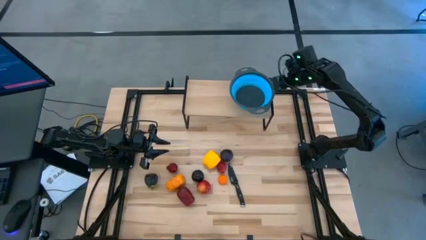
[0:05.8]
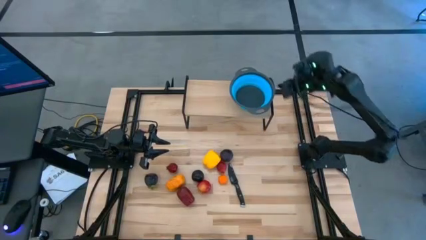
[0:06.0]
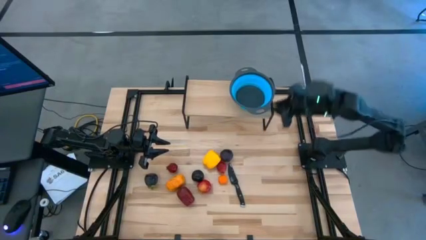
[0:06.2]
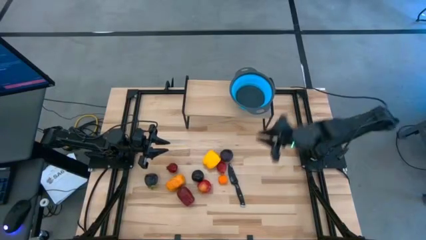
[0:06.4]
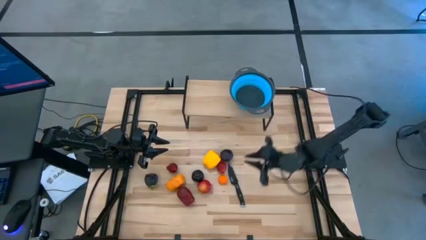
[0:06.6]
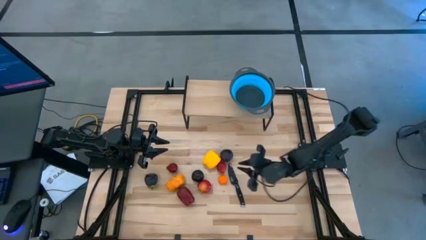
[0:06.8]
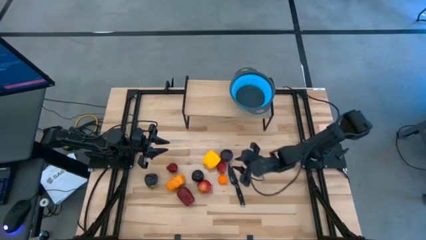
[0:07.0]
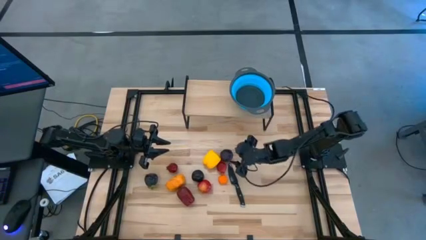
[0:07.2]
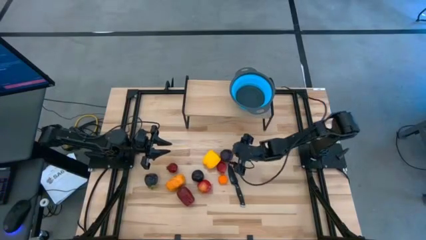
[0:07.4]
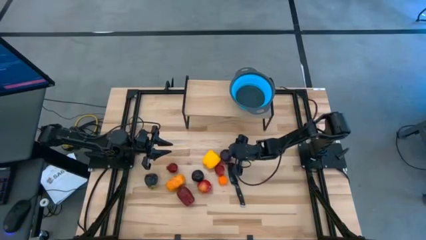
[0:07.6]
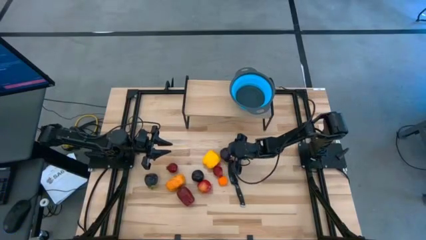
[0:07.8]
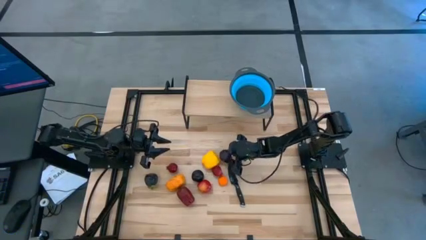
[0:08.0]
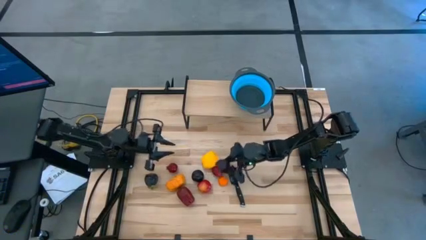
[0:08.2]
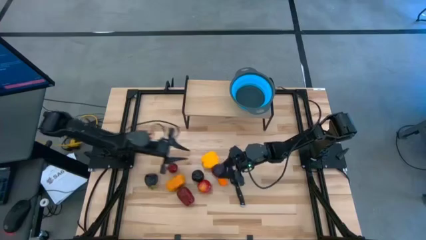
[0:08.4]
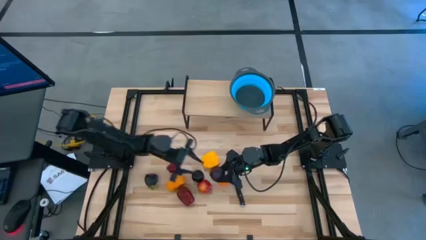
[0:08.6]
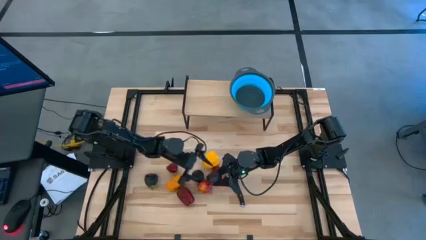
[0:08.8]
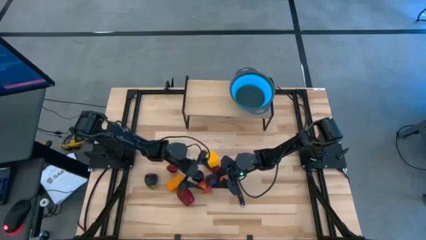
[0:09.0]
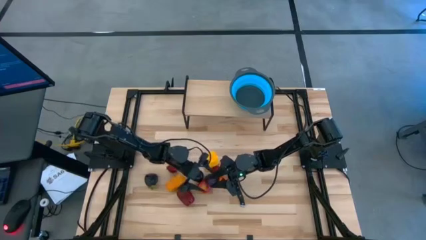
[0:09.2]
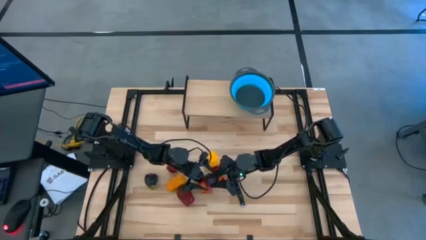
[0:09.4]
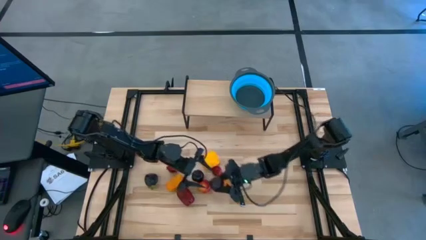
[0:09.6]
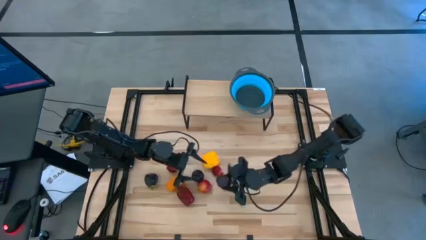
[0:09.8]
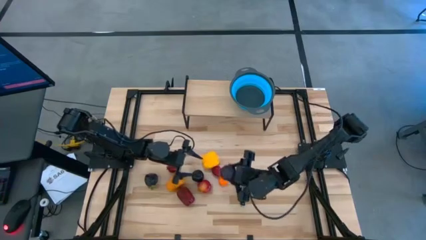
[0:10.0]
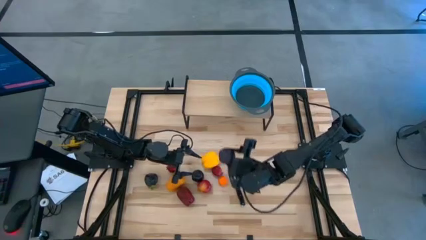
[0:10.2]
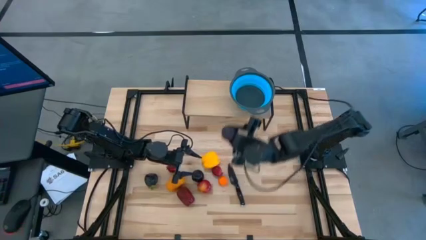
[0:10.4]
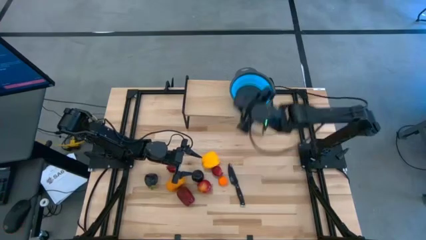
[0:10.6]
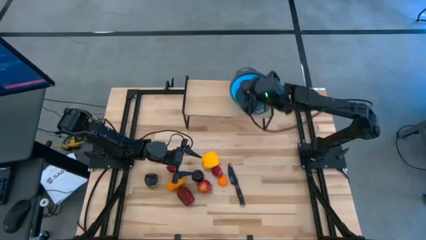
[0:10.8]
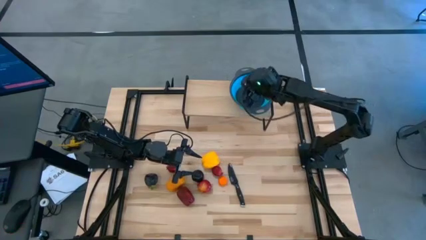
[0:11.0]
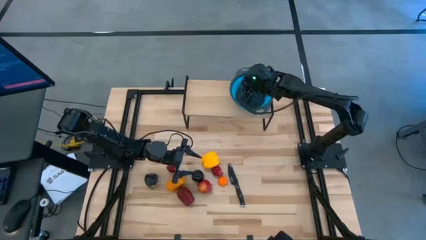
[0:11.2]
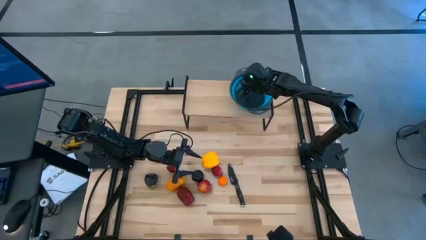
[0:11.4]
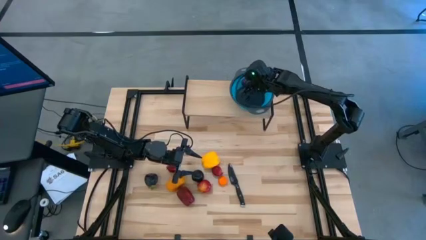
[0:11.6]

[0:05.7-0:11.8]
Task: Pick & Place Fruit
Put the top black plum into the blue strainer bowl on the shelf

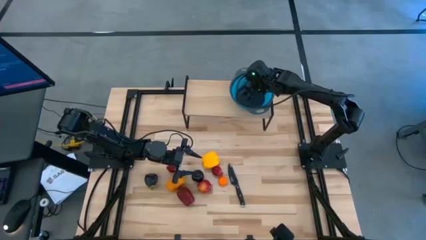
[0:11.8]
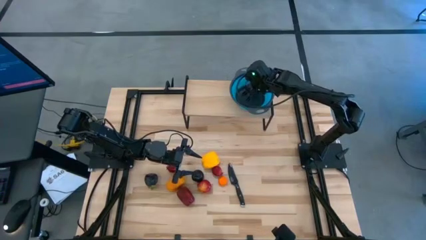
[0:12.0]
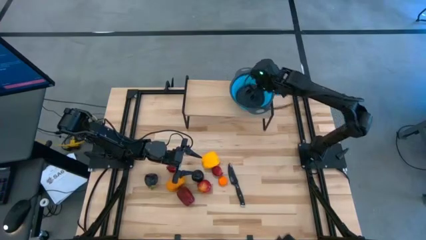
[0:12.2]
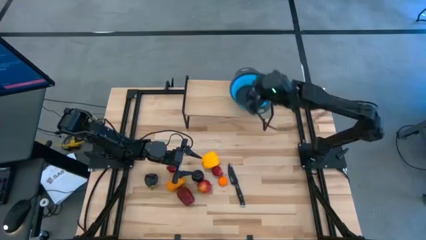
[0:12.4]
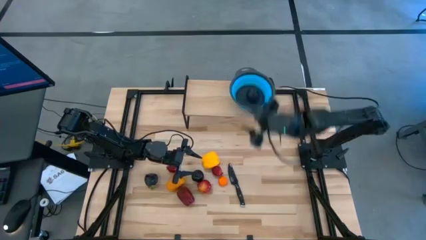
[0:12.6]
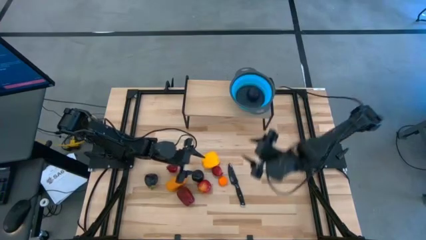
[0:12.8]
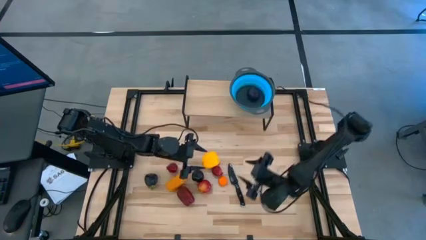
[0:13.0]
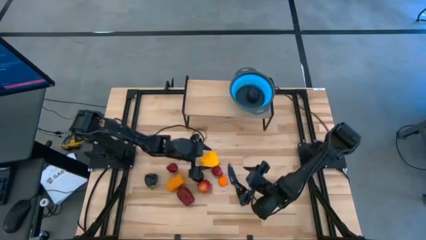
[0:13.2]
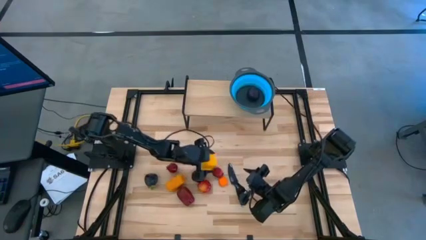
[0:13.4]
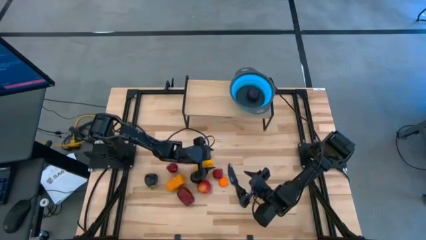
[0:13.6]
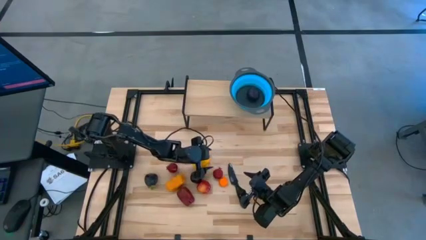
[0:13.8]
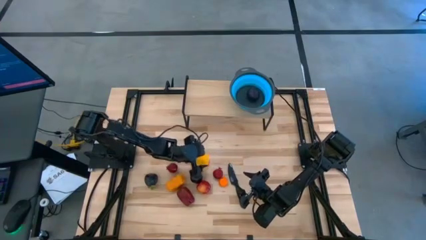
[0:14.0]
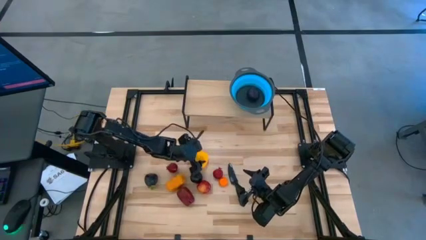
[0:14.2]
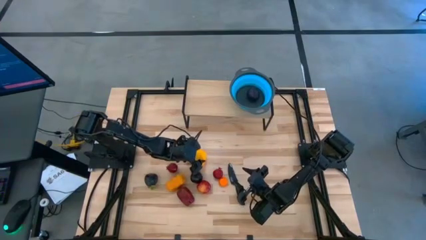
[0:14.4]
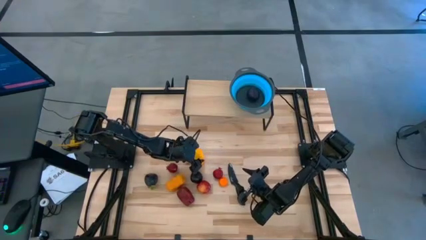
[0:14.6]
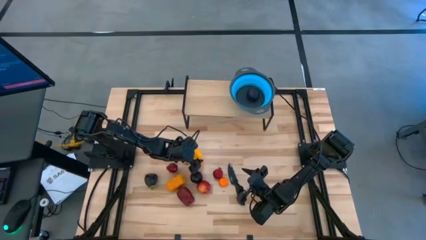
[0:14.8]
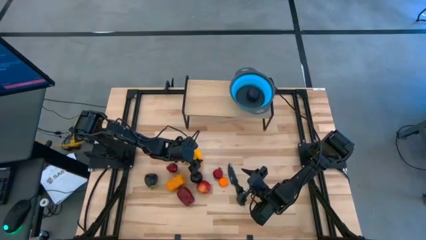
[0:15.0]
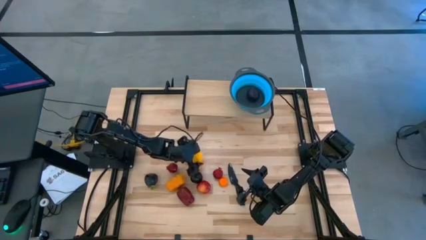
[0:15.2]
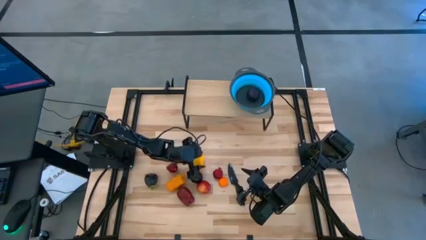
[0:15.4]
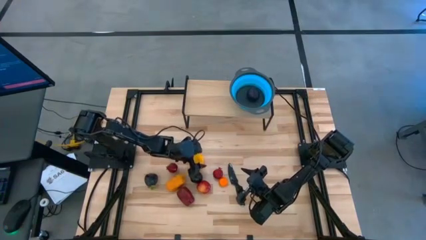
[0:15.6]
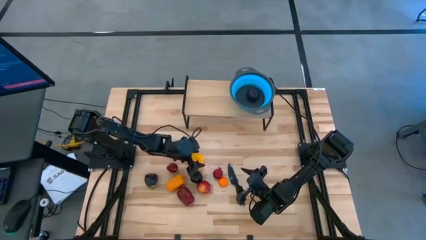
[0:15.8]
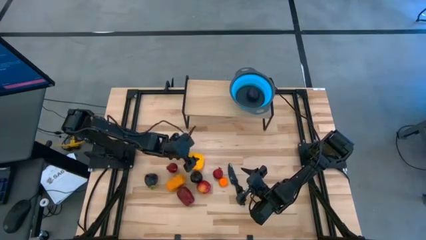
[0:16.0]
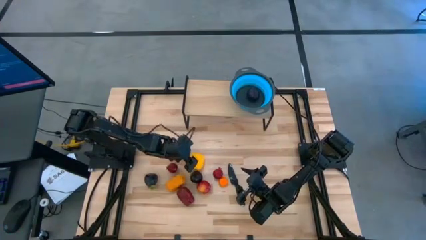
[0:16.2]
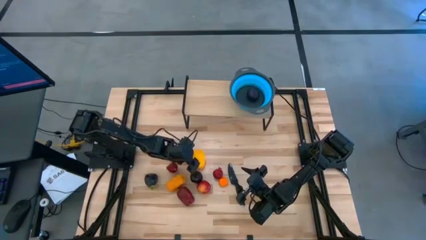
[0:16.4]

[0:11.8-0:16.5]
Put the yellow bell pepper into the blue strainer bowl on the shelf

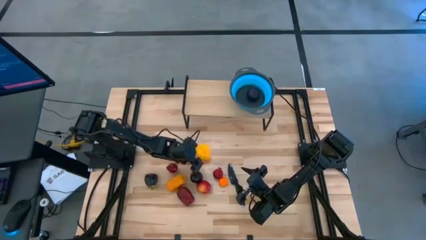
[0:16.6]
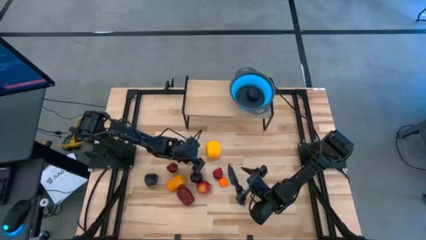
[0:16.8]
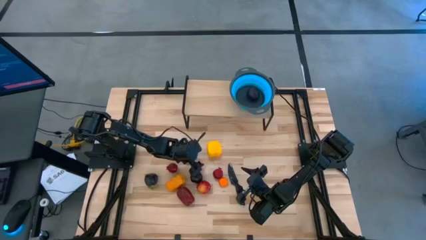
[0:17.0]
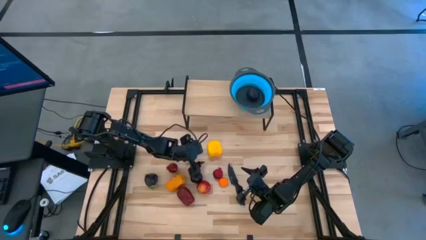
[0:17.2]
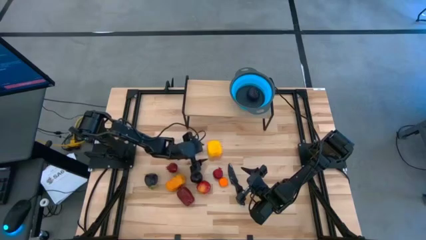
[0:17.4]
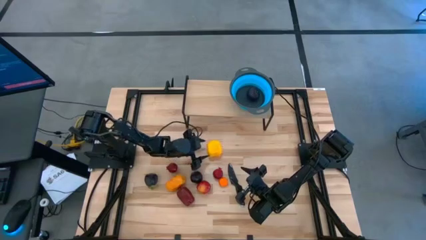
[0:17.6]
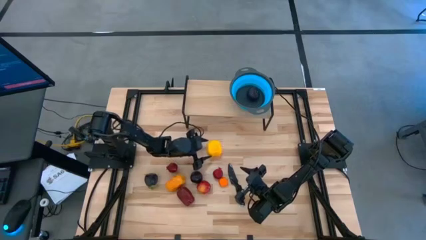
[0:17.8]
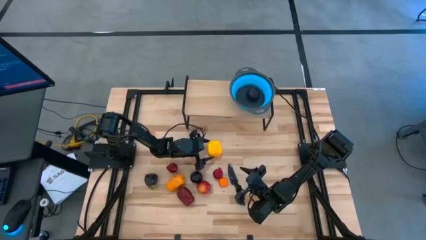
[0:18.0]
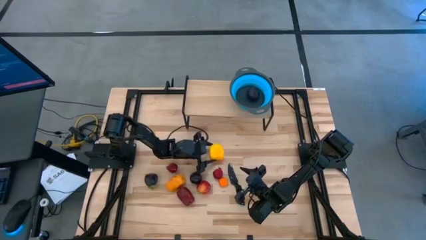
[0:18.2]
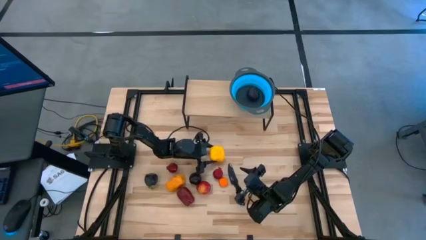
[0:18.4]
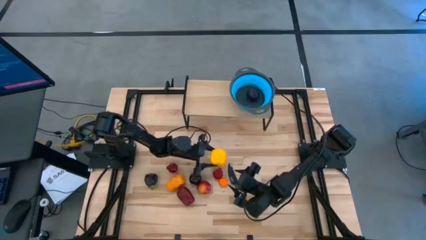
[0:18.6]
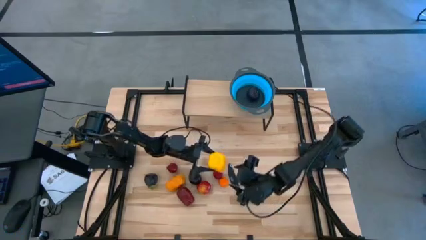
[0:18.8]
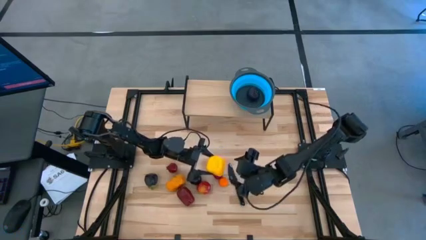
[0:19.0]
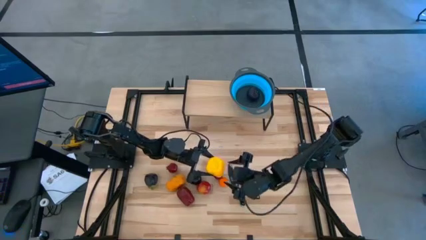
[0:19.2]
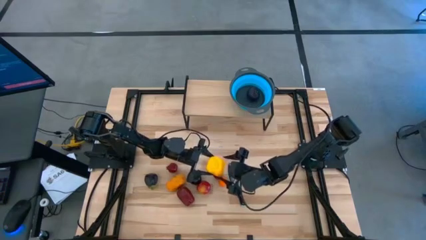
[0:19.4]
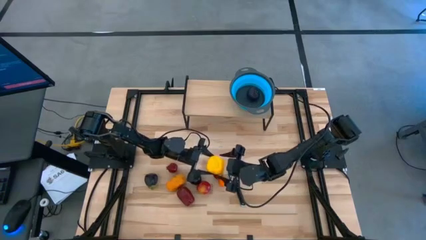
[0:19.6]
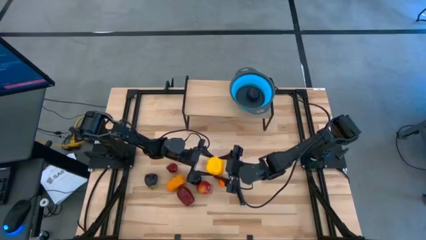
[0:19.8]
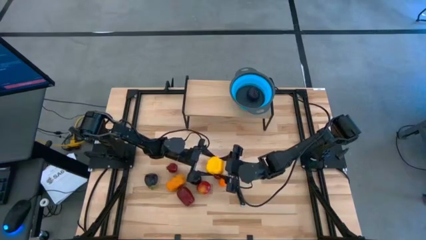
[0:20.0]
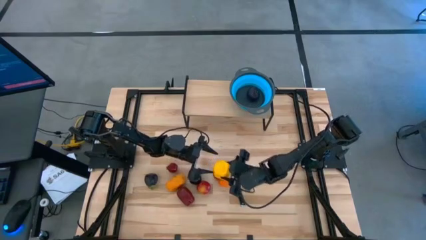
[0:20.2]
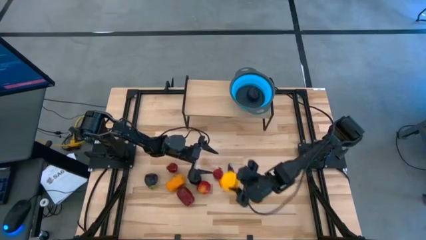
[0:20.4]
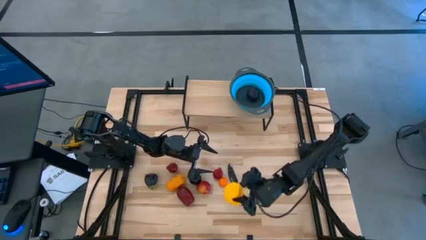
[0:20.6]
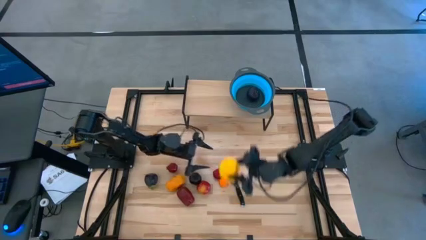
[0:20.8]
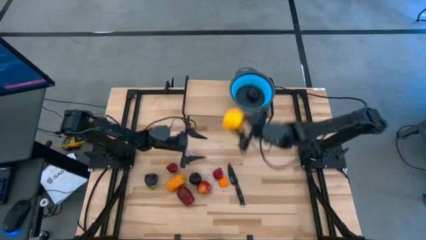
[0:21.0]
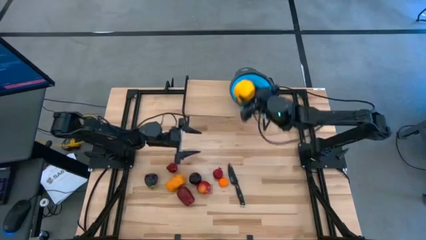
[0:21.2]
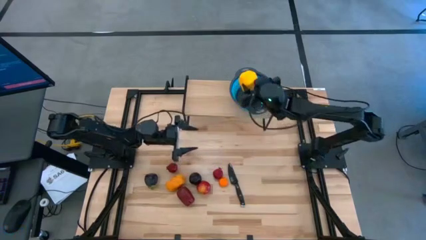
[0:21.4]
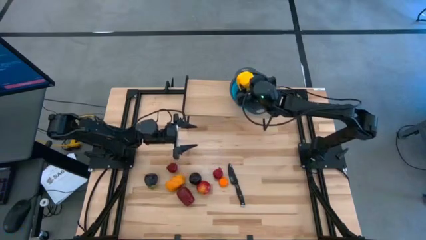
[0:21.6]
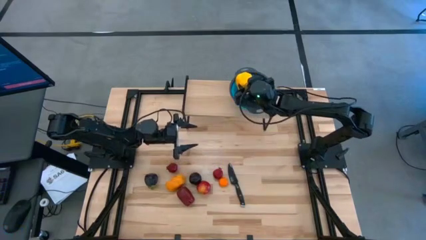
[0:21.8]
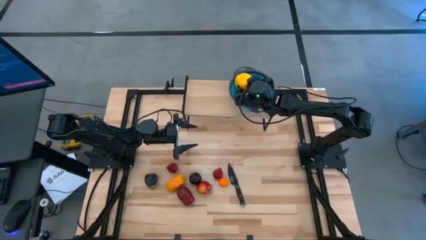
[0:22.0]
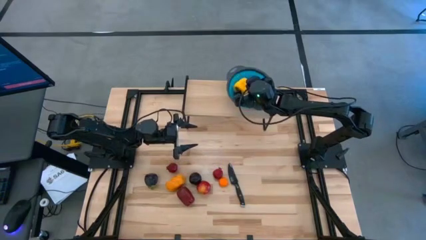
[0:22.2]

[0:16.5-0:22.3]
Put the yellow bell pepper into the blue strainer bowl on the shelf
